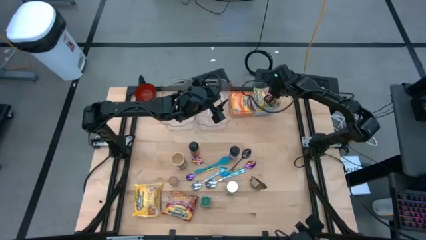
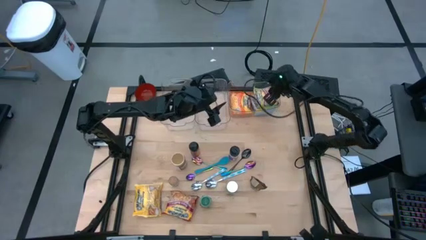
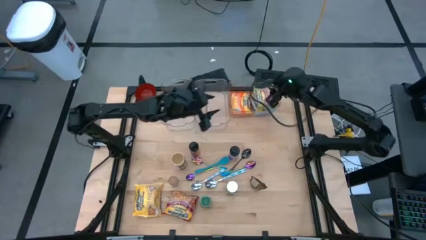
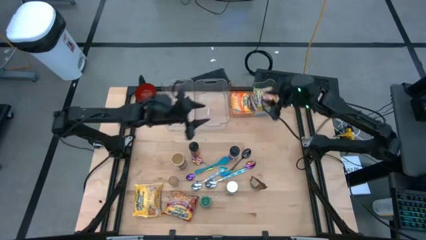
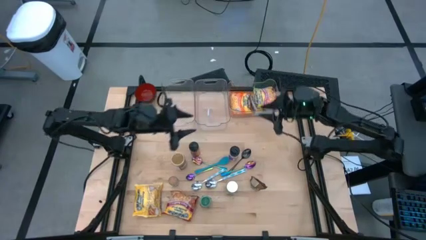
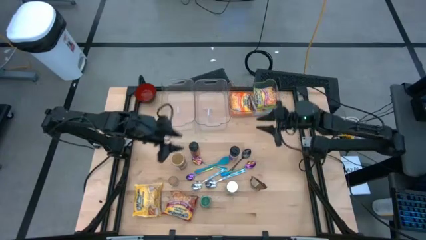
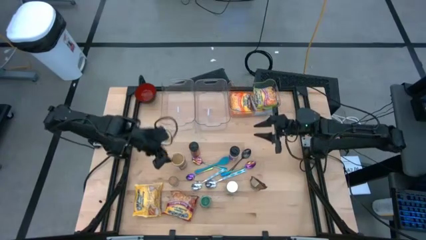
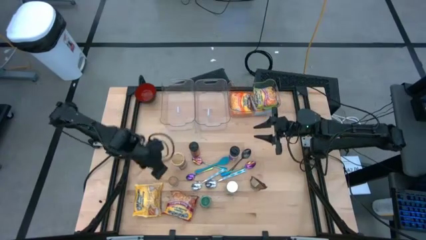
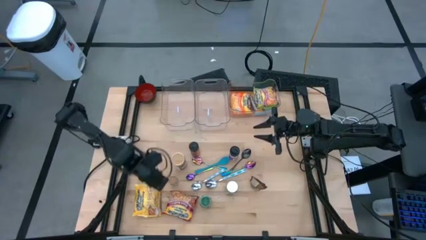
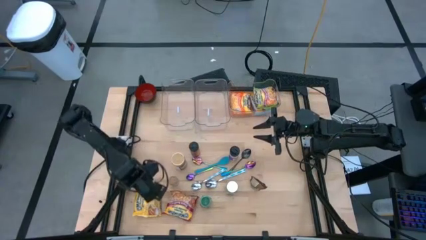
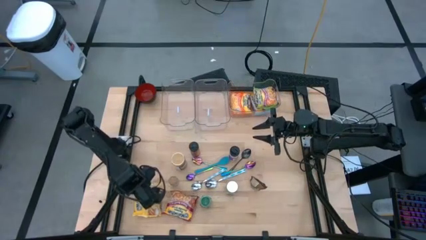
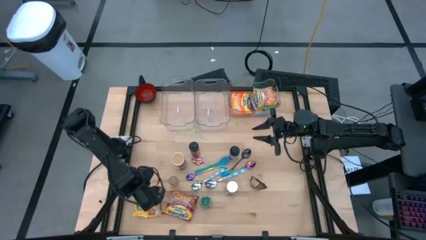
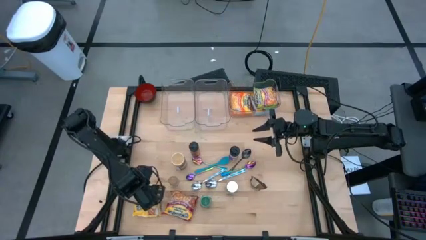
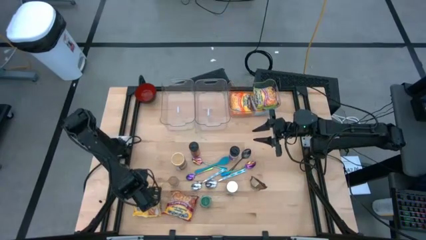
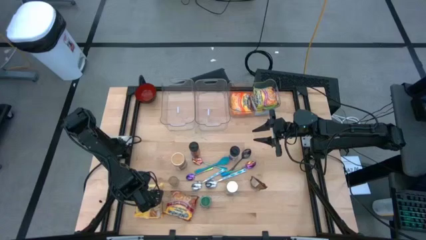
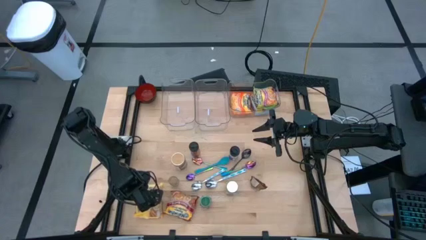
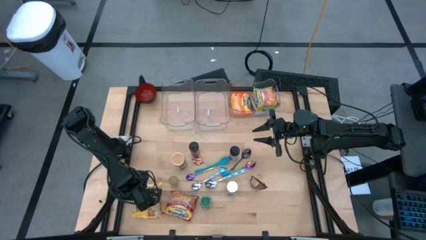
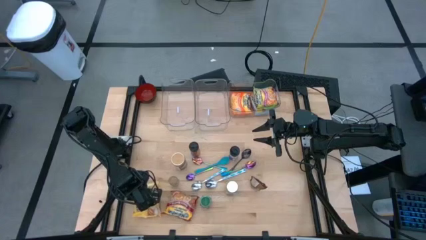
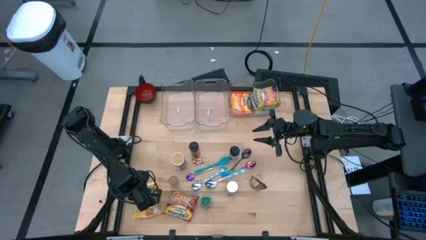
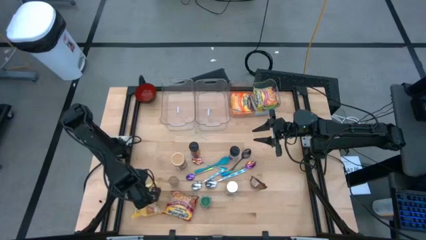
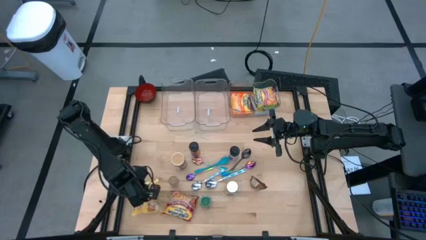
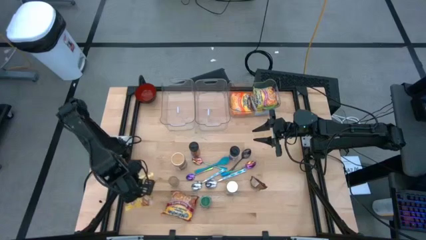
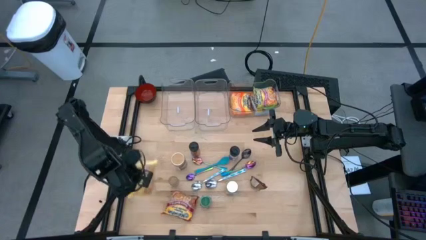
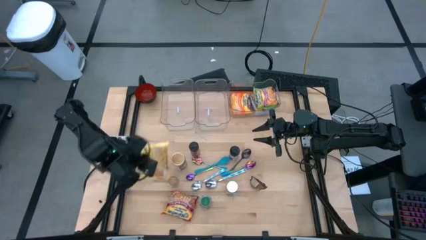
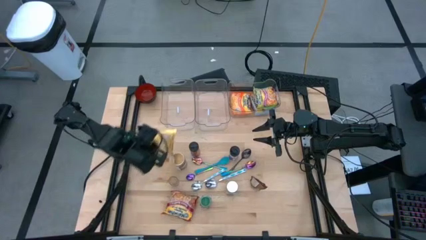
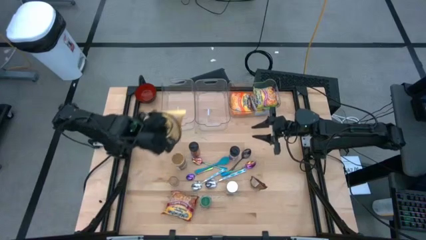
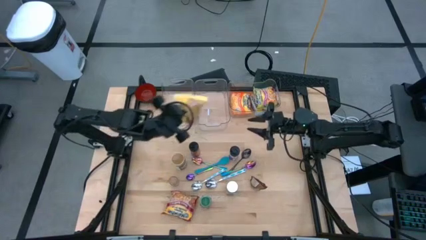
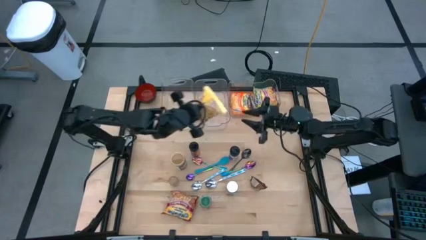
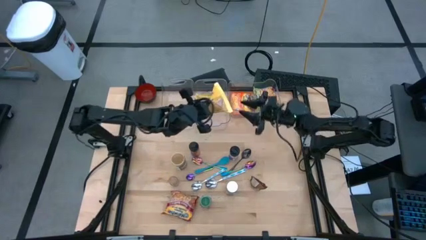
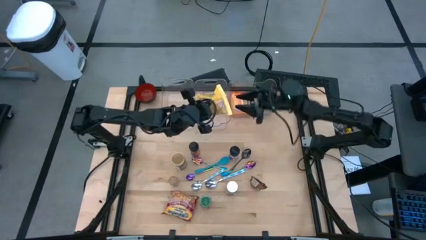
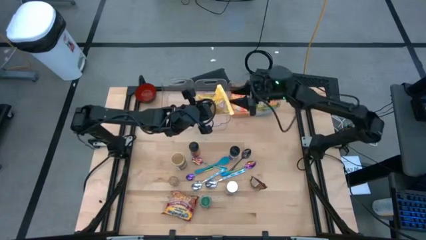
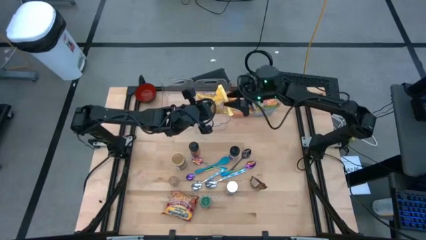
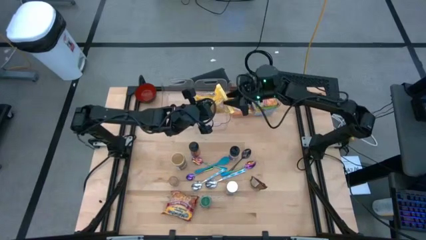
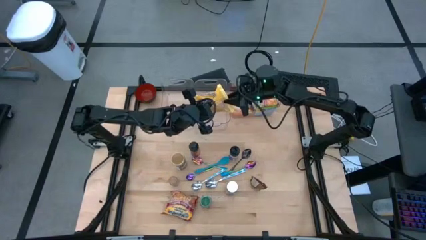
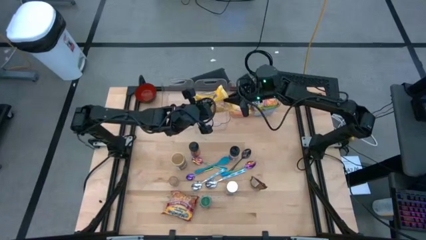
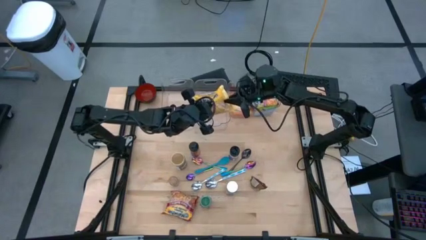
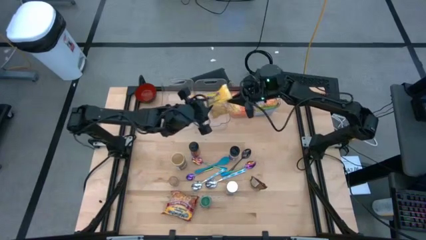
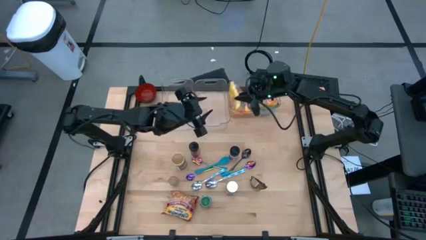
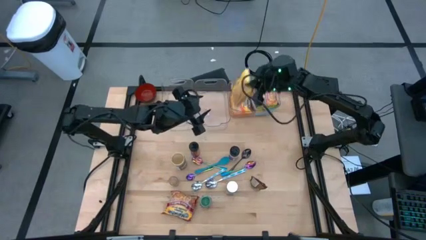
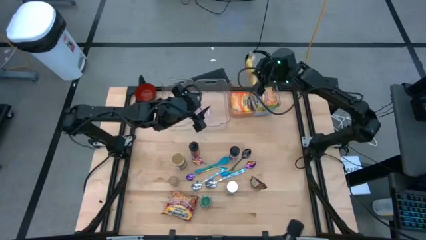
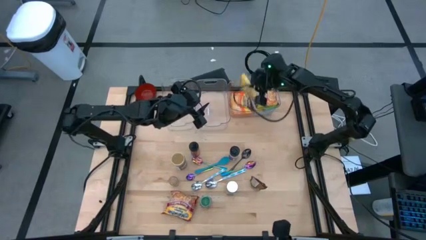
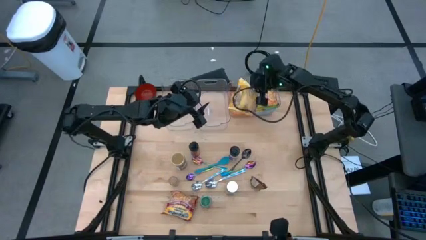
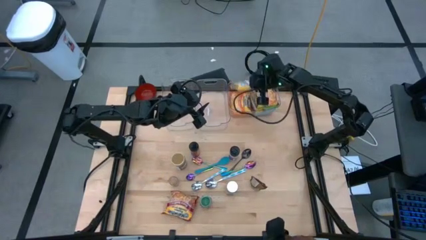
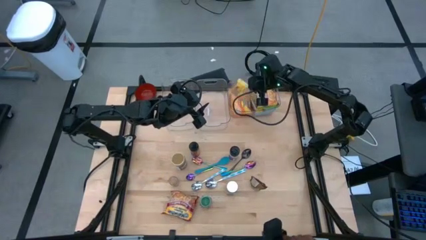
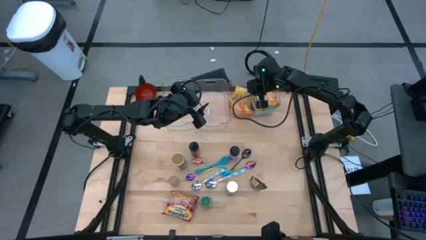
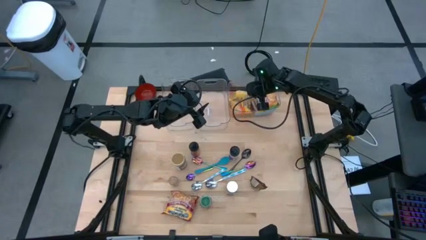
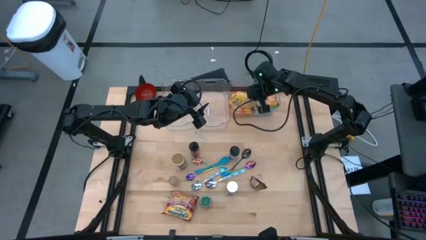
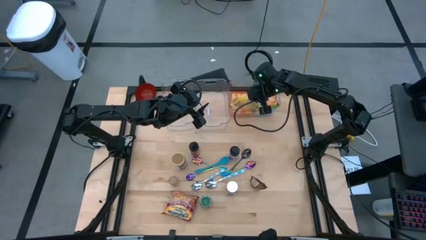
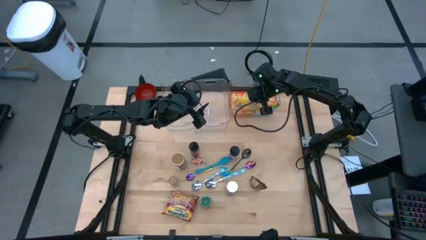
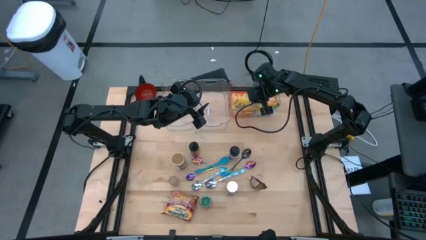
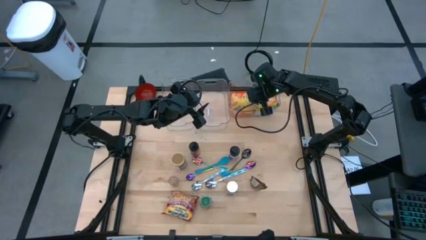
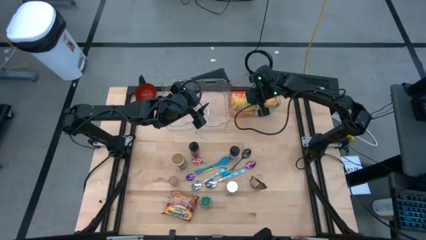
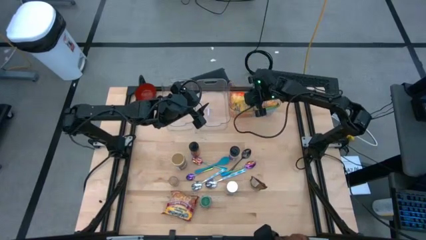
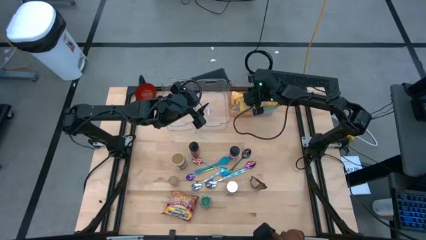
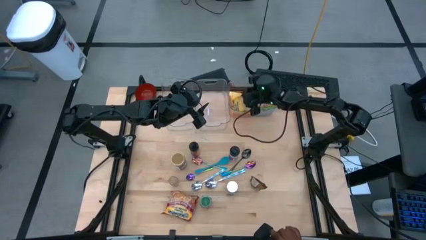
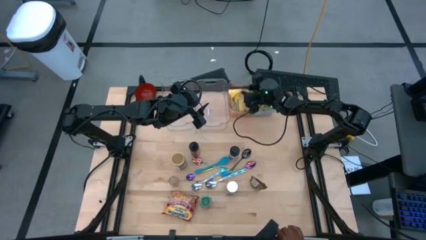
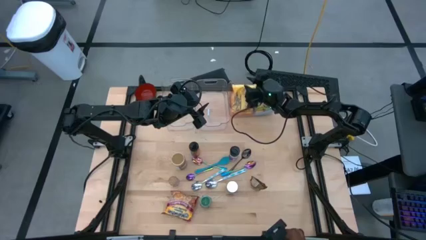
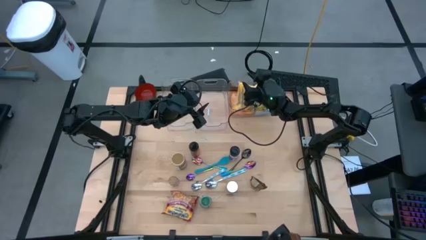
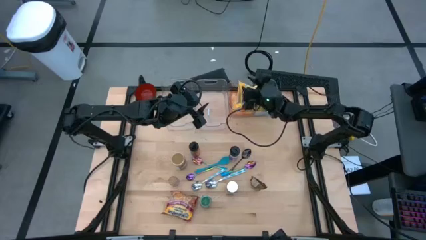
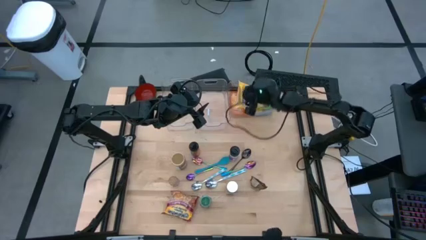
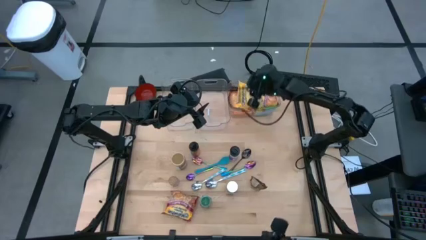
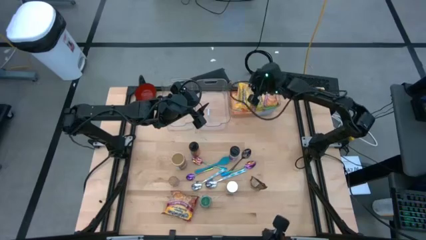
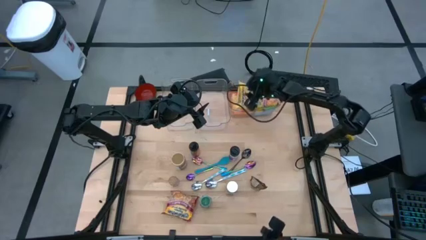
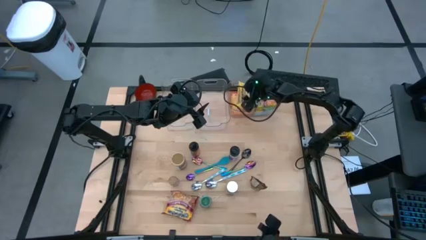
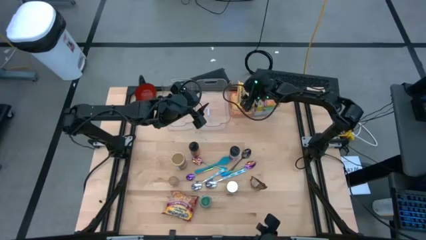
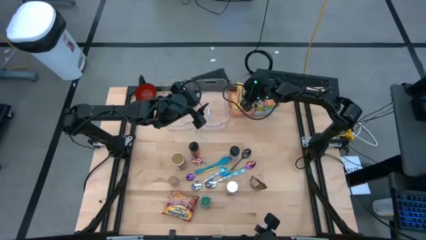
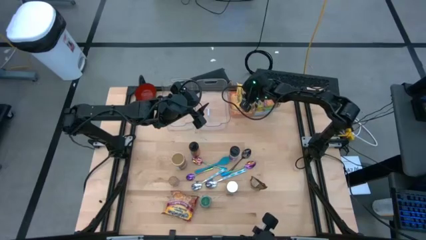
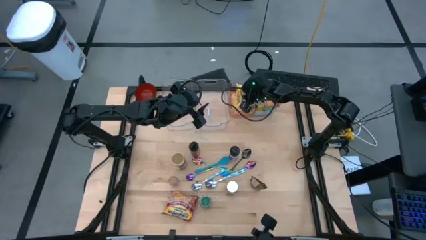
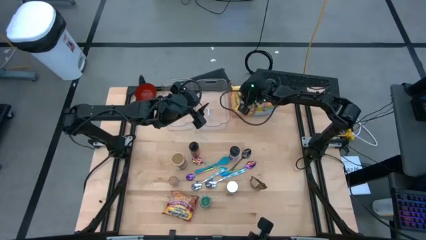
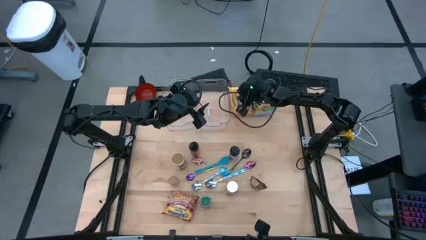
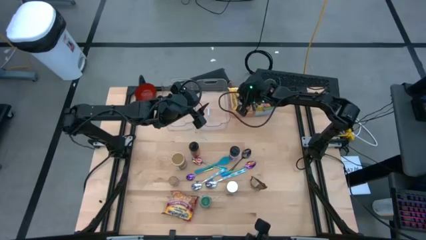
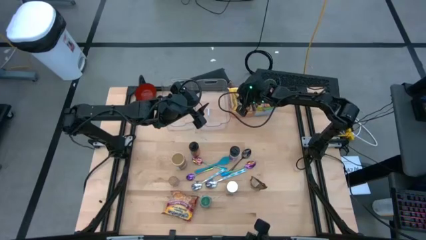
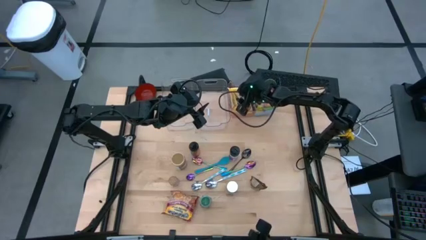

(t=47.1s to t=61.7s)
Task: Pick & Place Food Item
Put the yellow noodle pack into the right transparent bin
